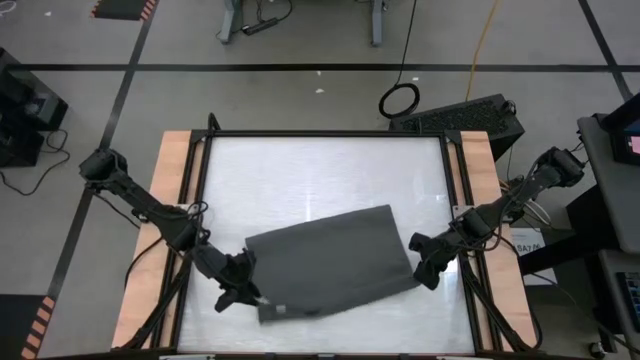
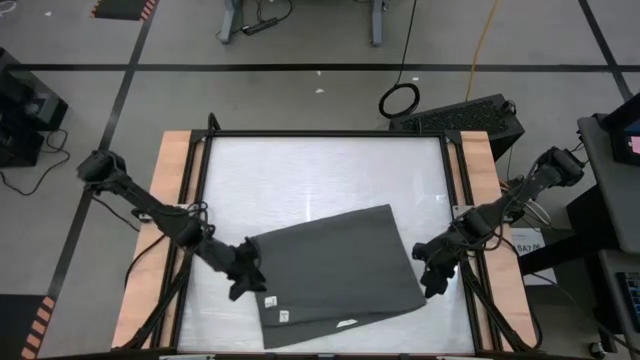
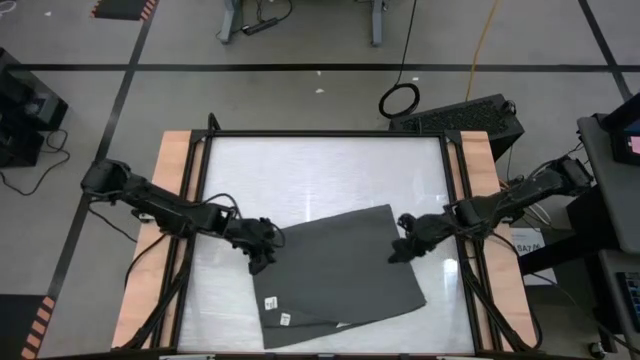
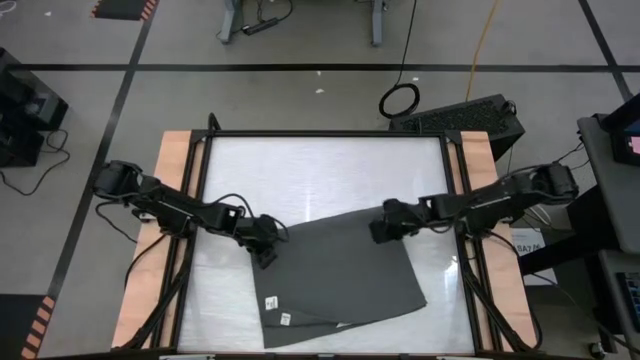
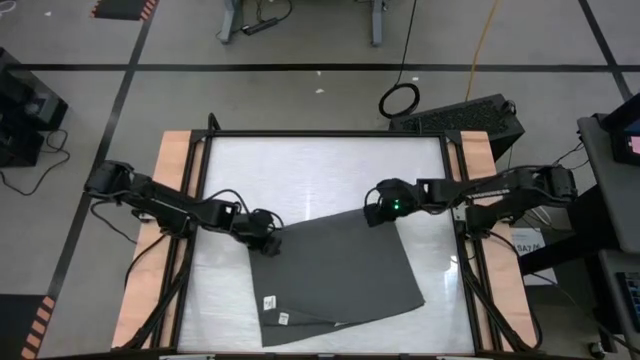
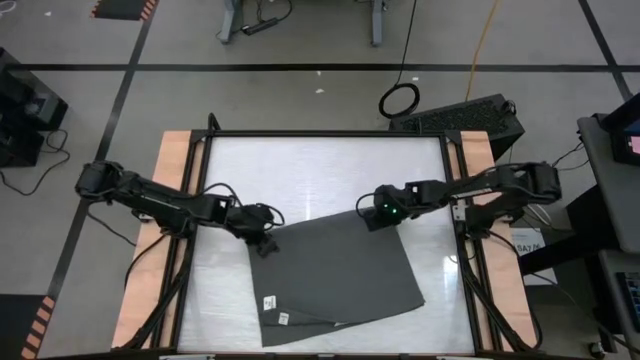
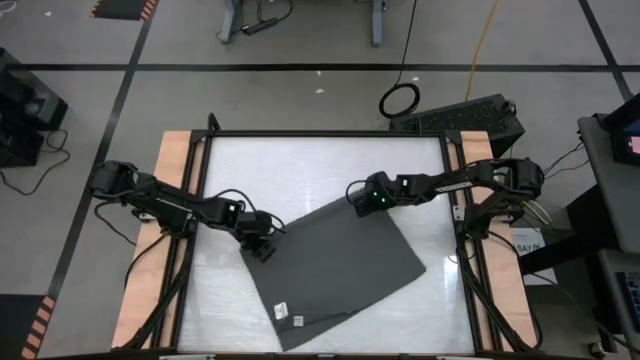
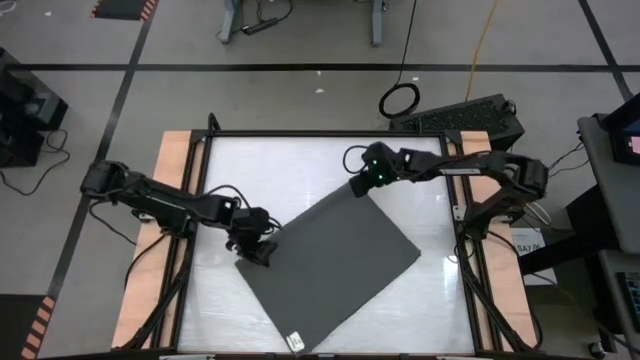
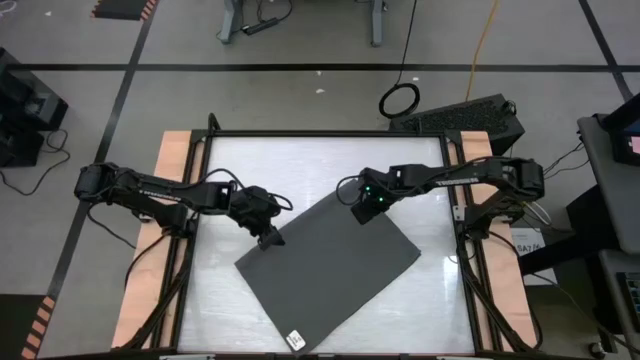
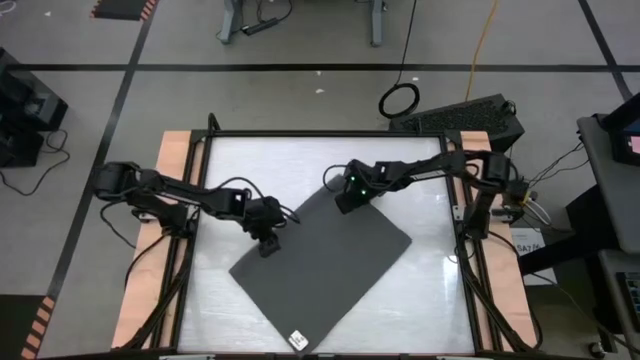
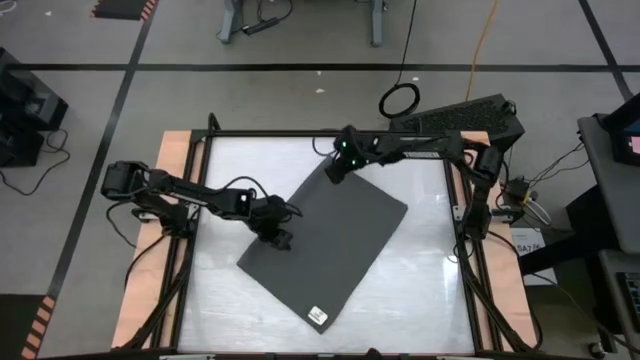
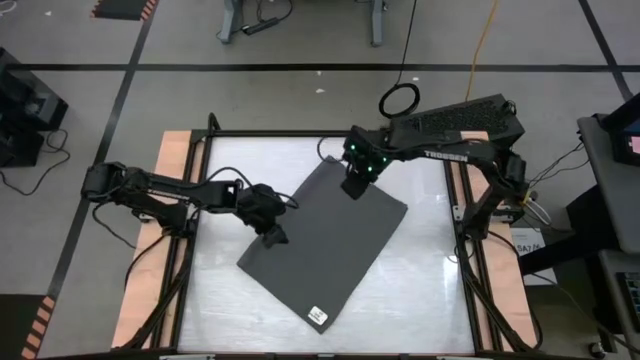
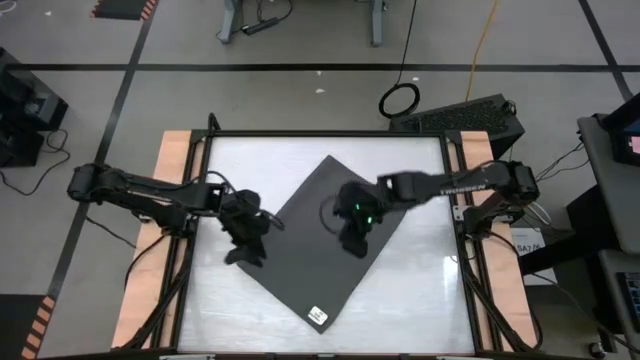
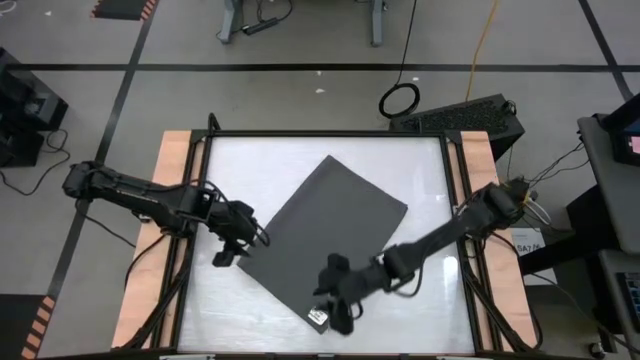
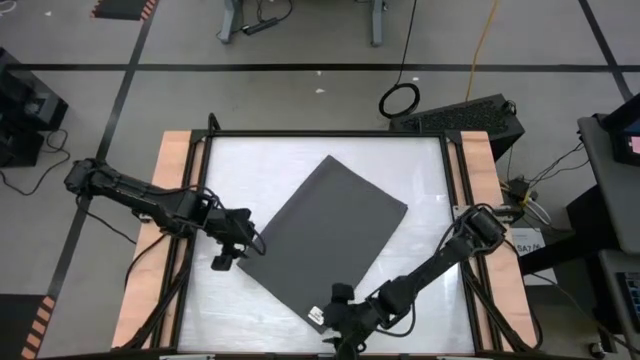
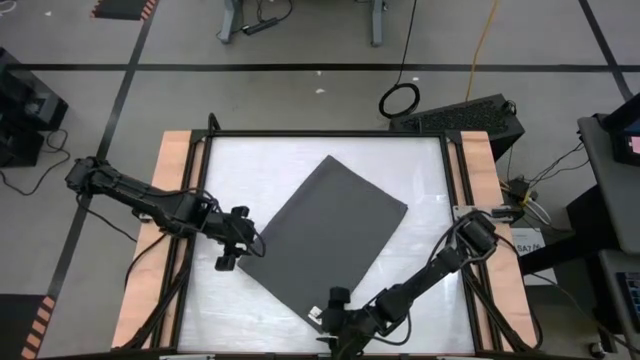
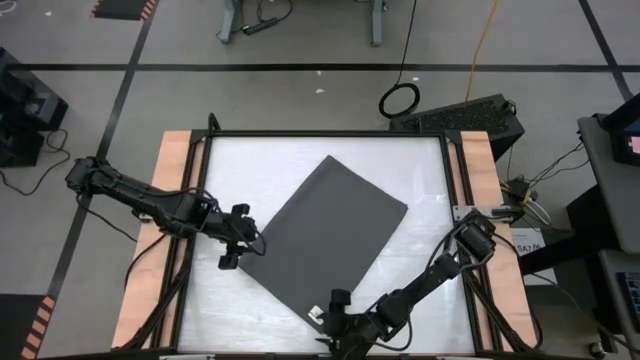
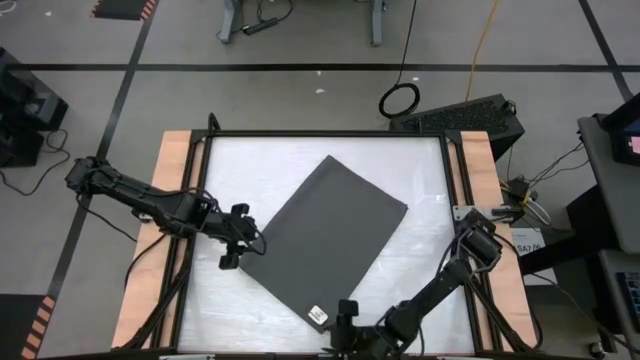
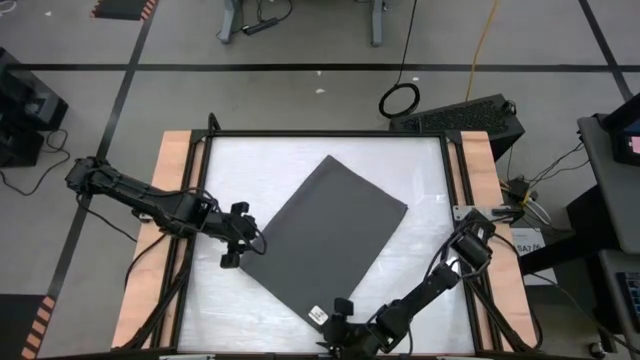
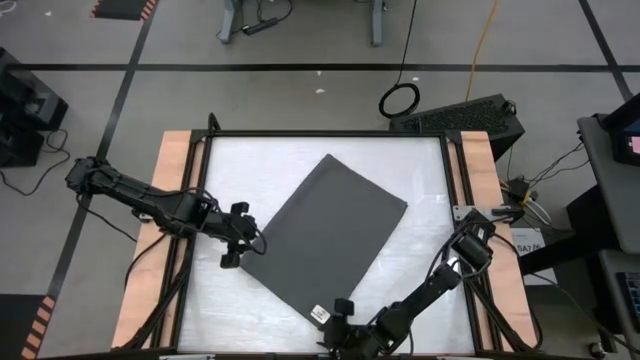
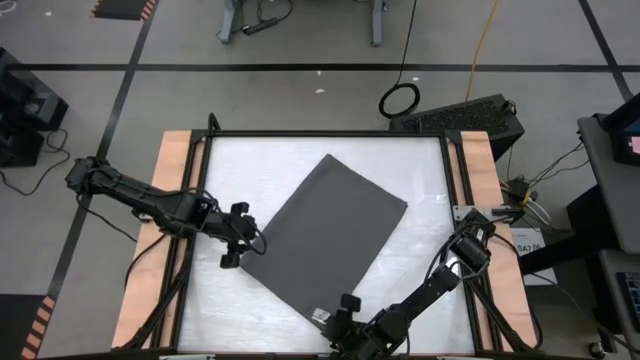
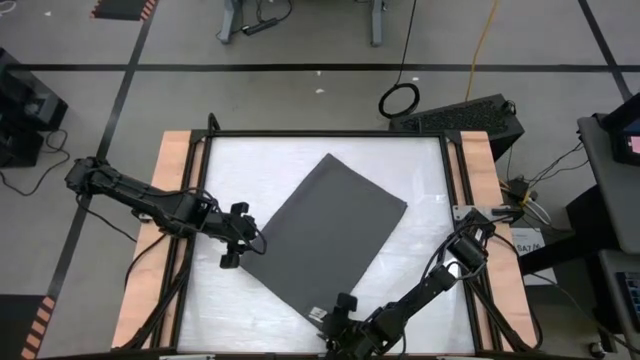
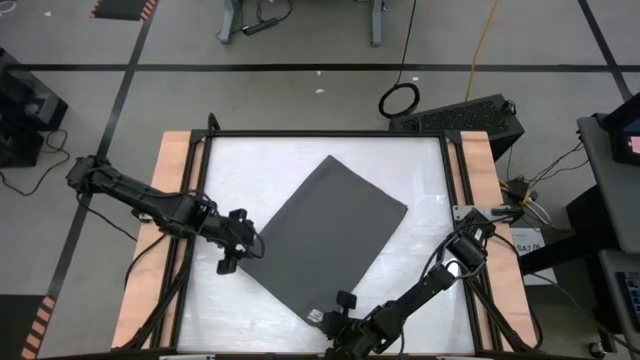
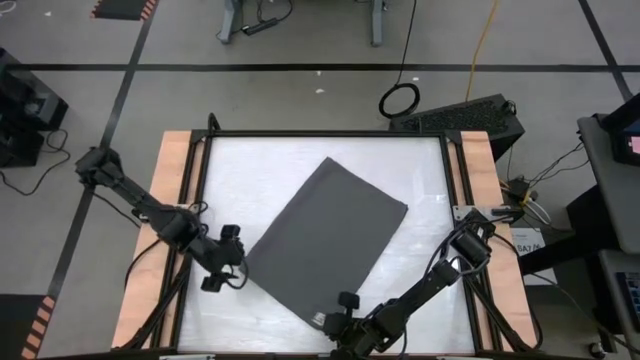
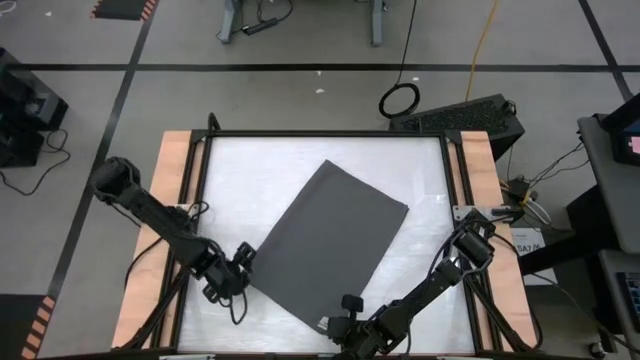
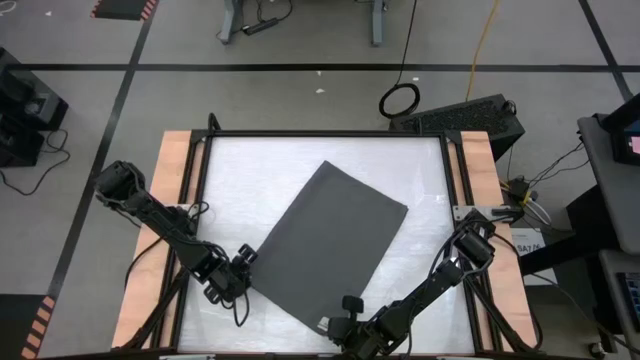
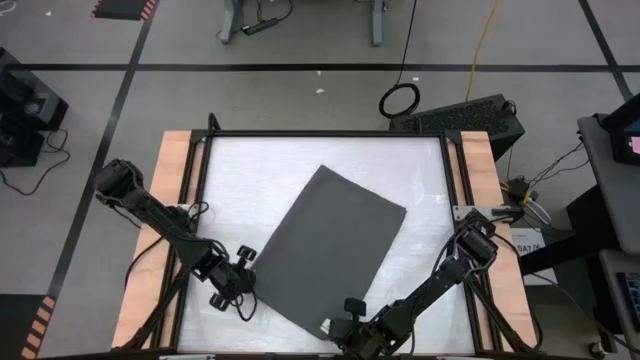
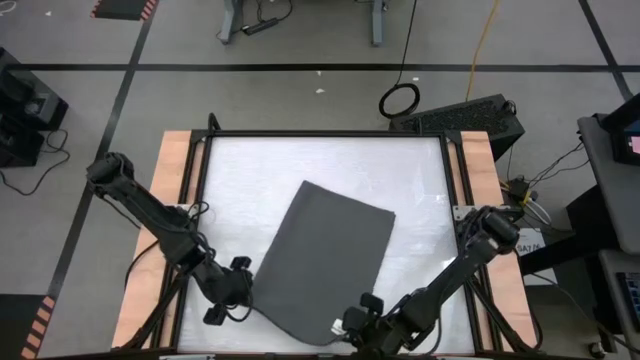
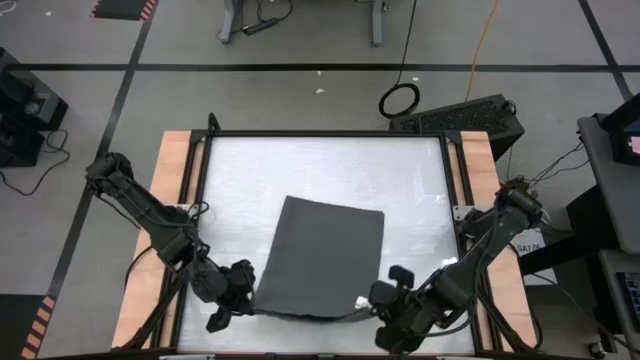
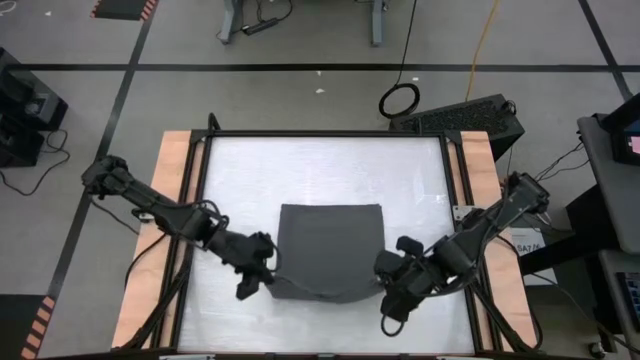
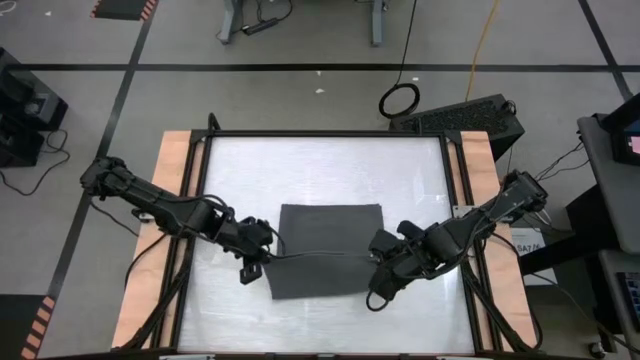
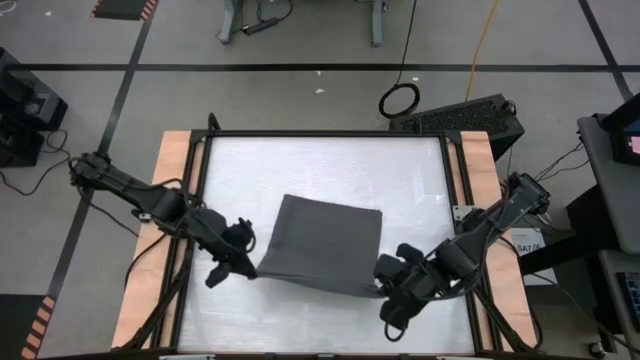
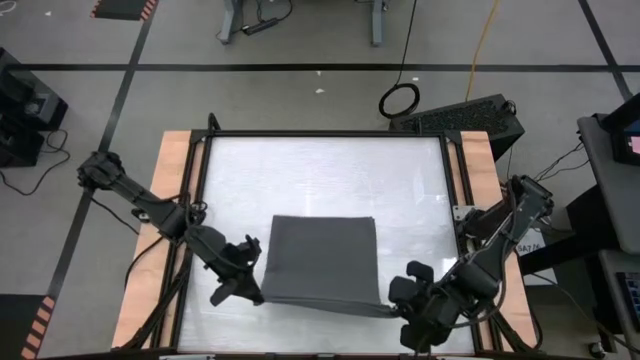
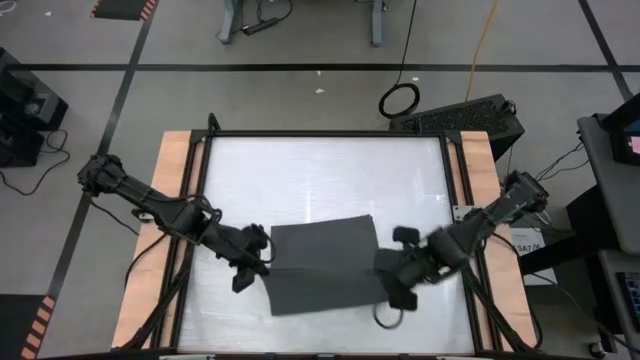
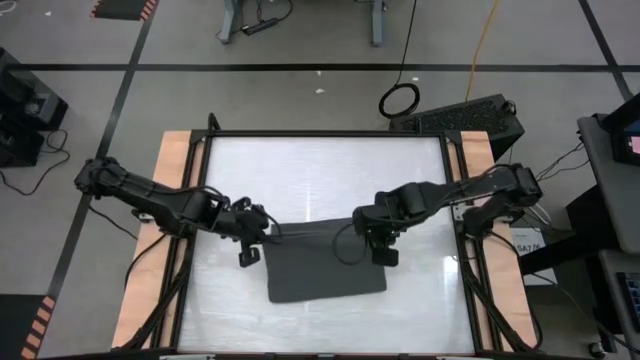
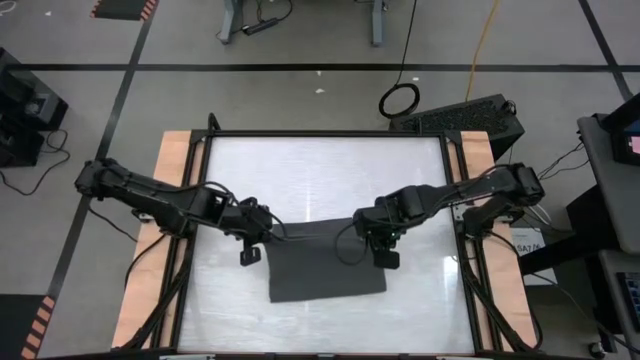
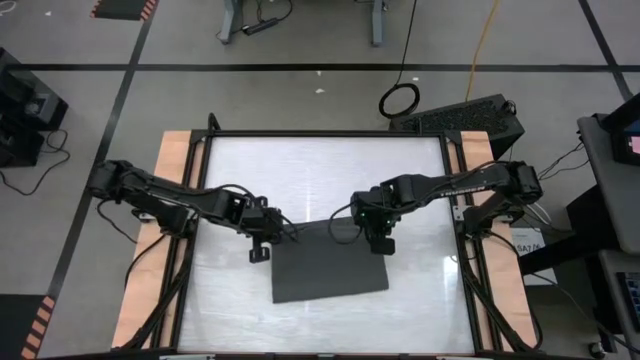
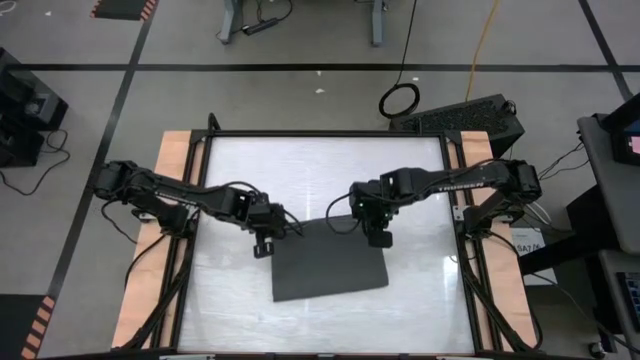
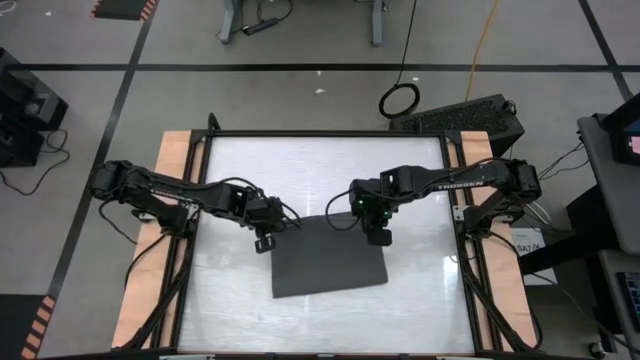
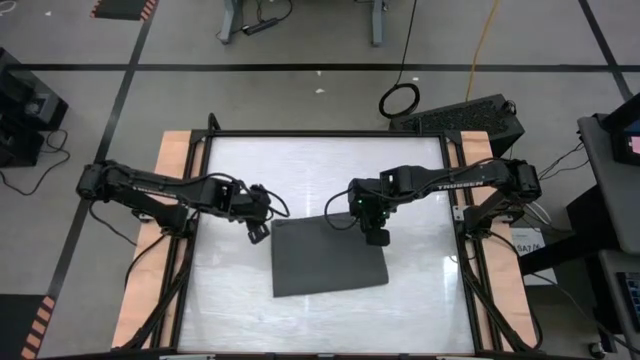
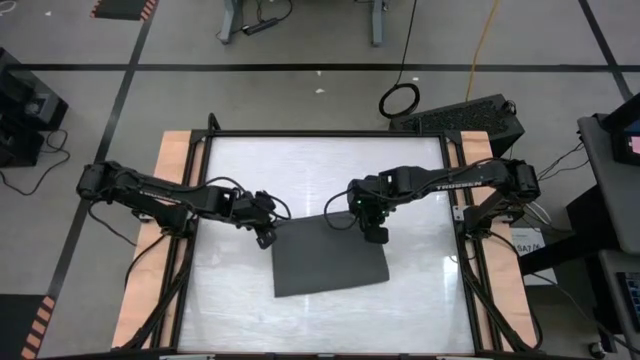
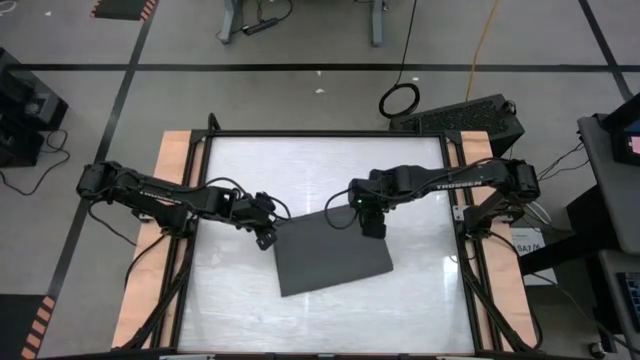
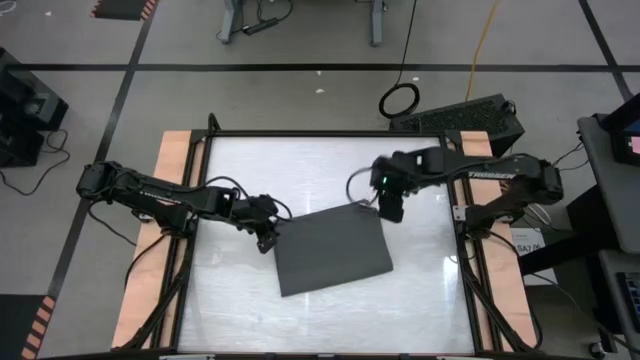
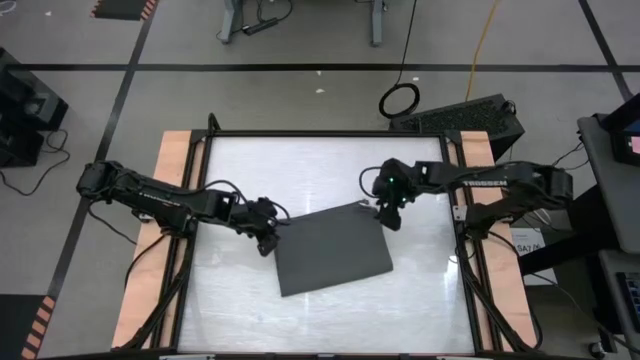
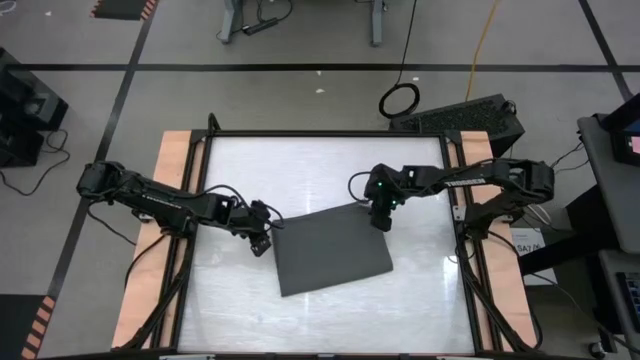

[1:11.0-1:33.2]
Task: Roll towel
Roll the gray towel
